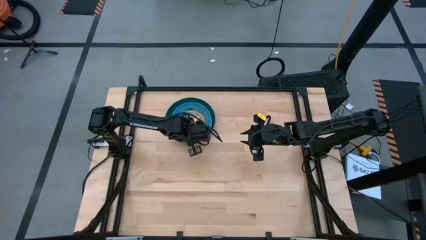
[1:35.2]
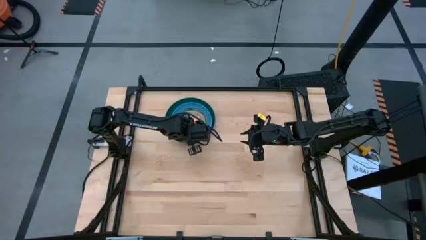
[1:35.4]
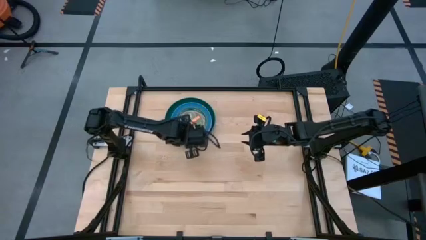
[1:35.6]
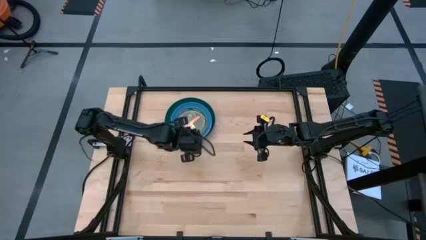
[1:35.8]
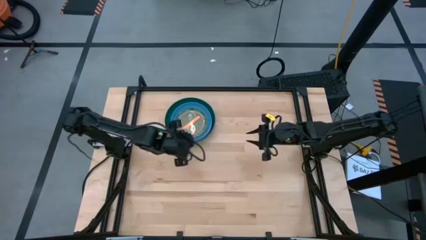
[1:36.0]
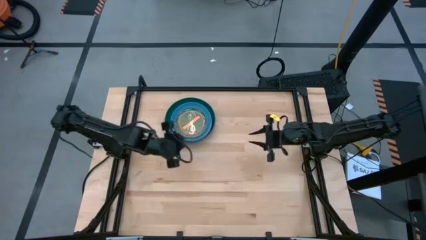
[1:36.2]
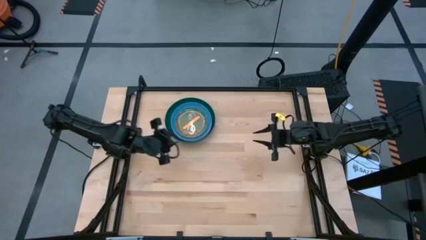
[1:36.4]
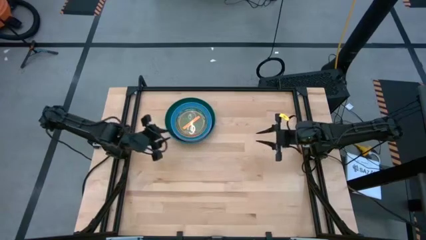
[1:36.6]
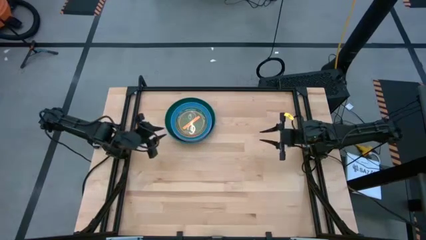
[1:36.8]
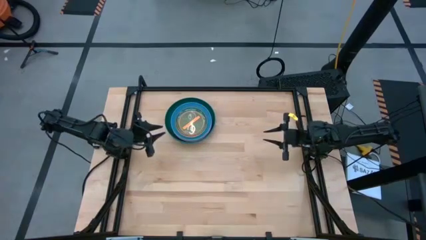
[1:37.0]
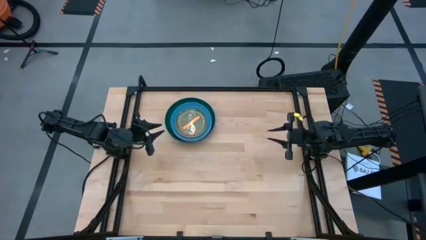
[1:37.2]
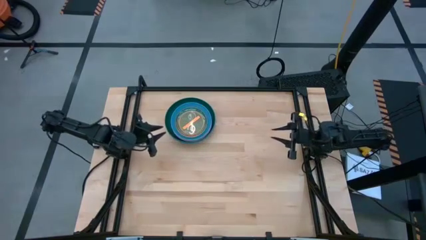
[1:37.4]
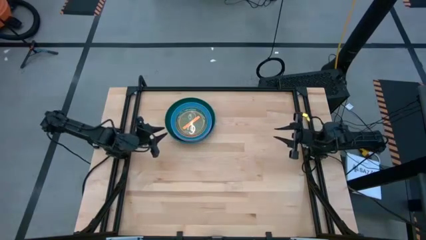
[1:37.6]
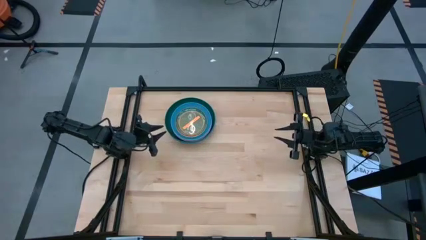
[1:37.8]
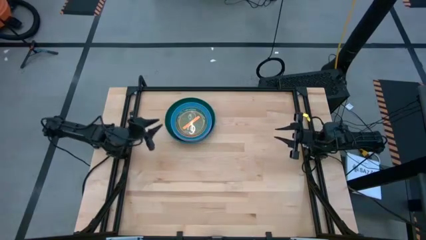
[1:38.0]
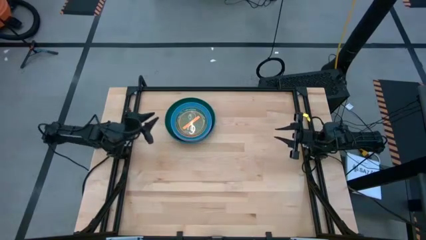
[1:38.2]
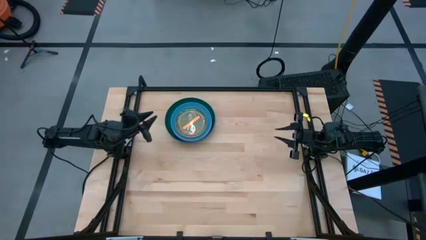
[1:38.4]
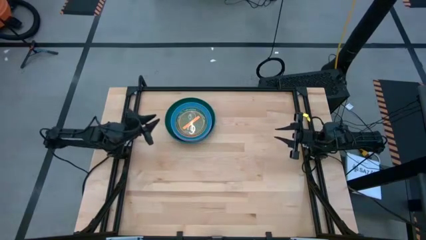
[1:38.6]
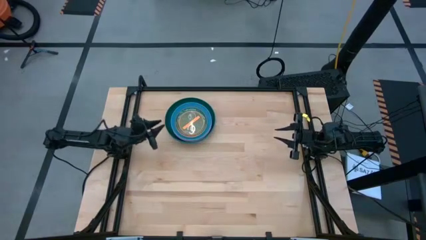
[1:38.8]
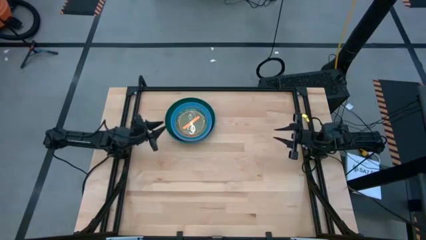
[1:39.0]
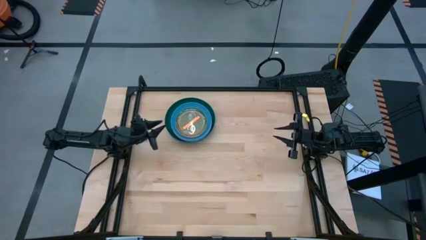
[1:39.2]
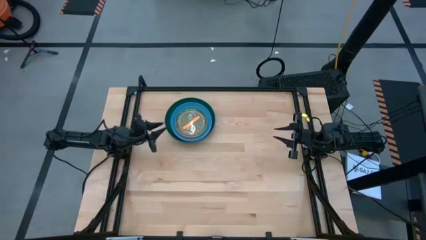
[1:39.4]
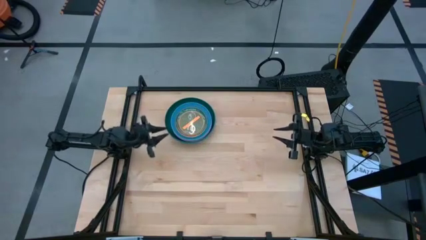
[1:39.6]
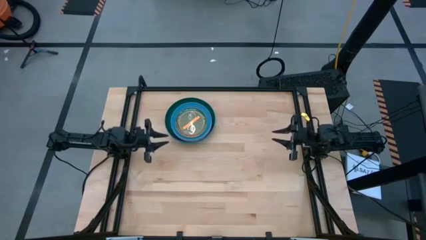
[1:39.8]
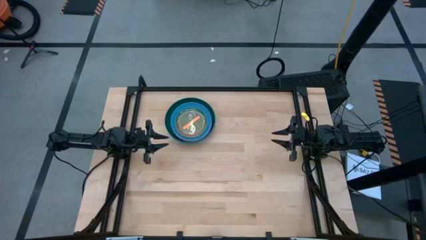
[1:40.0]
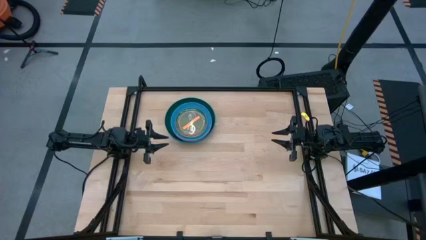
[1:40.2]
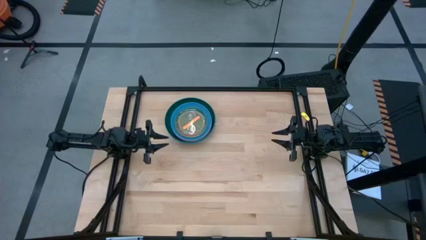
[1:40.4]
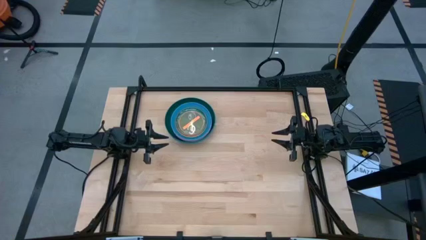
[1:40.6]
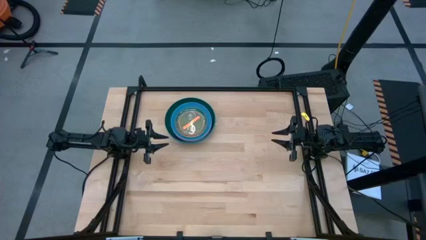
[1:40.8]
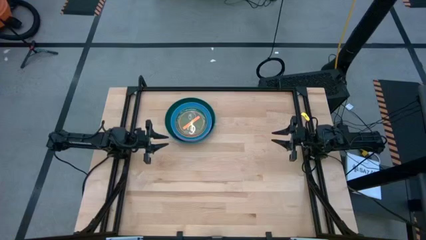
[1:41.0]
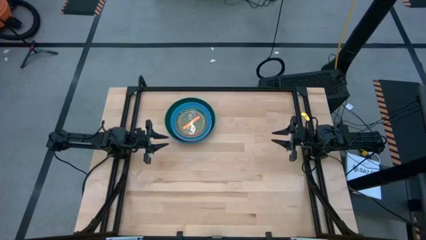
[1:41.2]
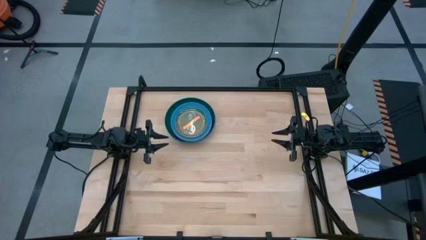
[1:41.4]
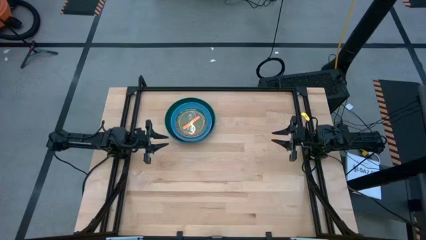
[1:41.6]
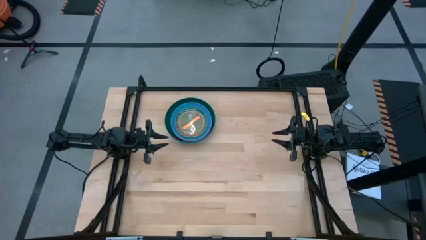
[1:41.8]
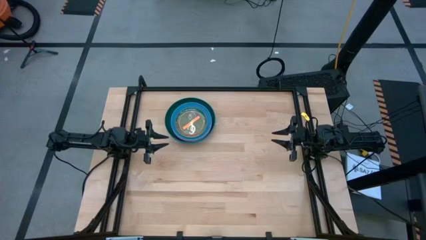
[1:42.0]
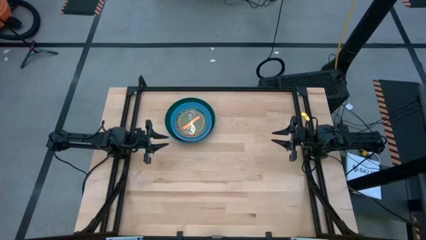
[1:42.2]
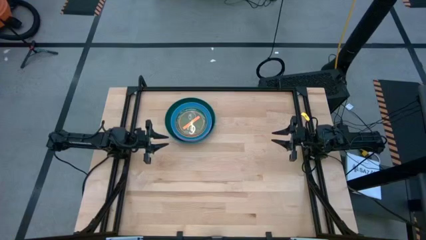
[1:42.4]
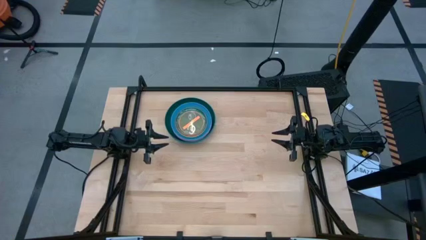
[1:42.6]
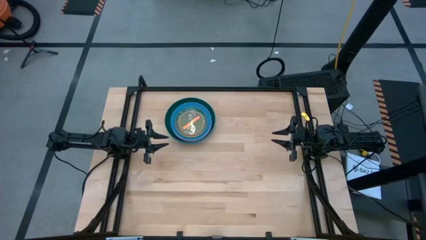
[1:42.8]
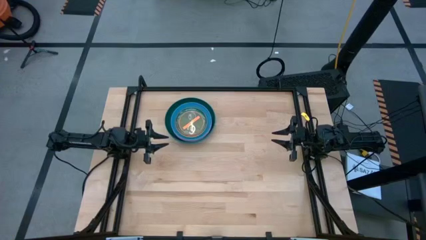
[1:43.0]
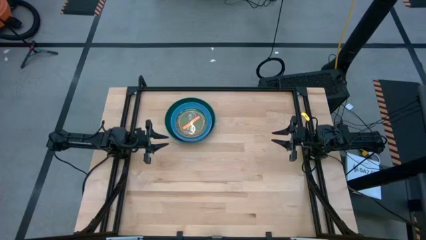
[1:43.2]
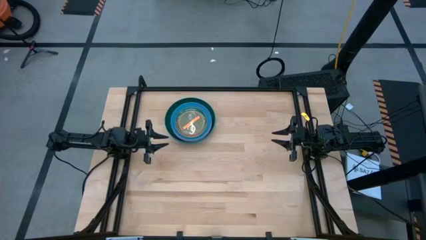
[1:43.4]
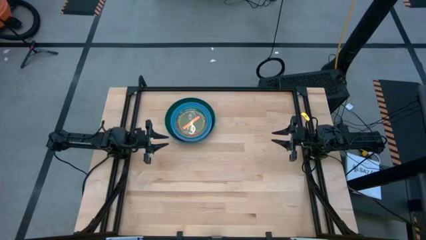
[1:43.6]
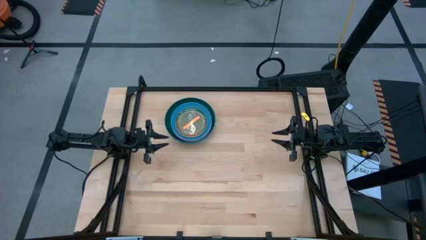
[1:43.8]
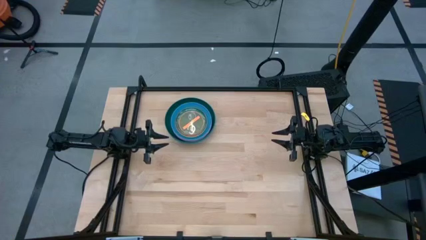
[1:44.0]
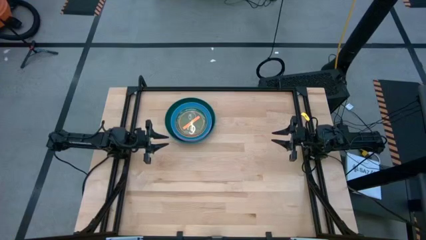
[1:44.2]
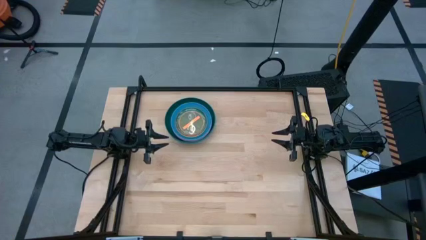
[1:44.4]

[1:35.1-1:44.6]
Task: Stack plastic plates
Return to Home Position

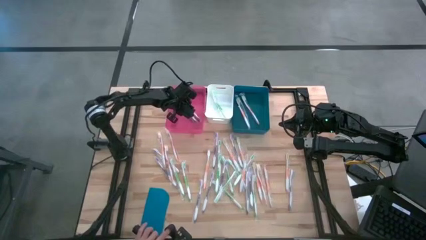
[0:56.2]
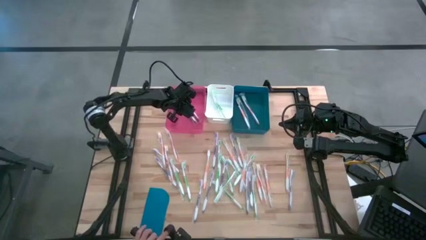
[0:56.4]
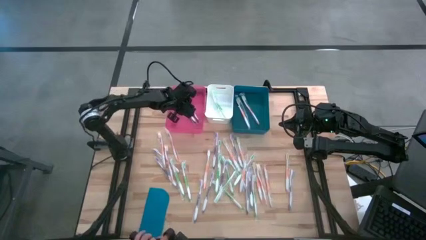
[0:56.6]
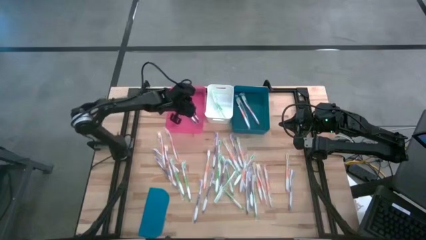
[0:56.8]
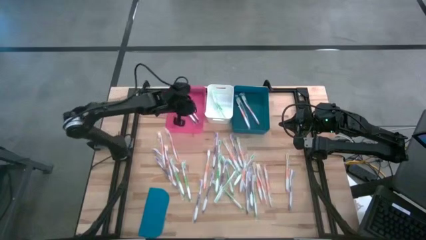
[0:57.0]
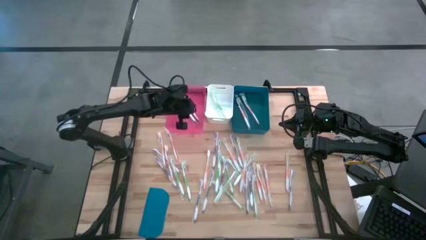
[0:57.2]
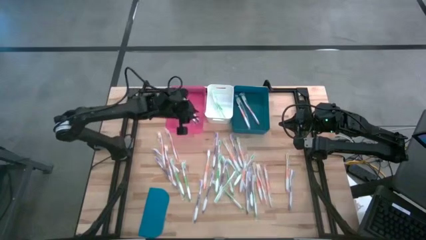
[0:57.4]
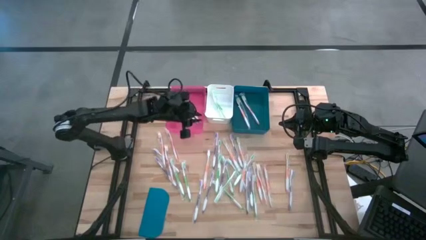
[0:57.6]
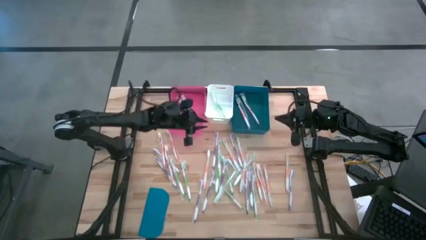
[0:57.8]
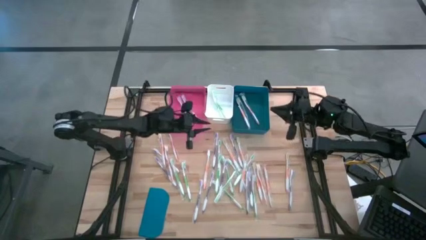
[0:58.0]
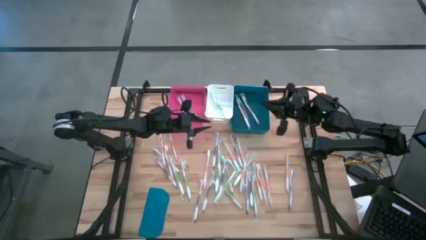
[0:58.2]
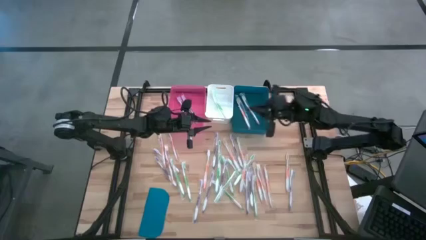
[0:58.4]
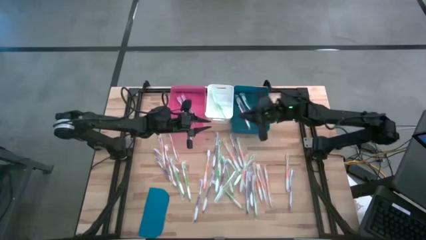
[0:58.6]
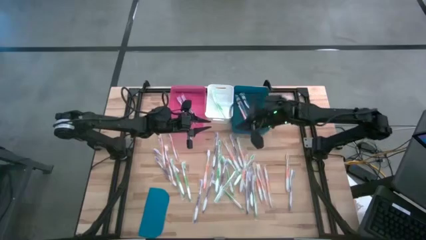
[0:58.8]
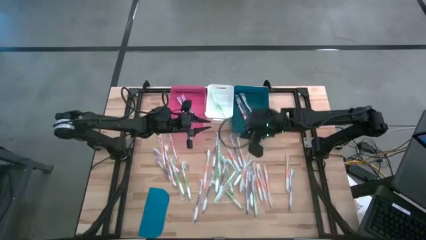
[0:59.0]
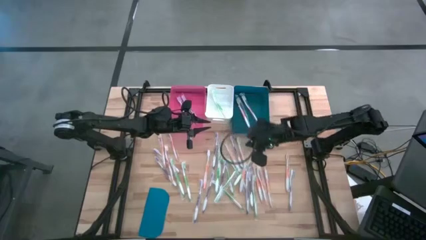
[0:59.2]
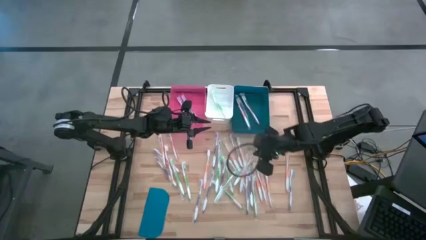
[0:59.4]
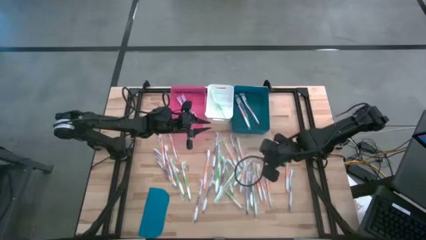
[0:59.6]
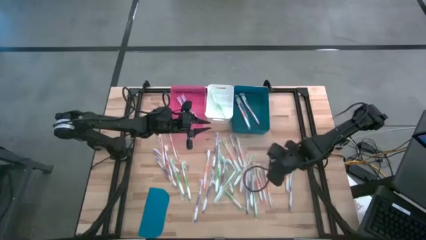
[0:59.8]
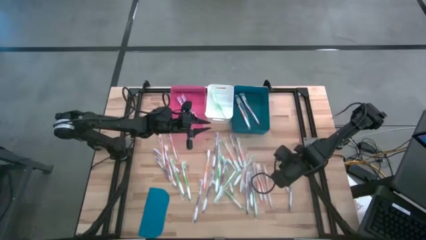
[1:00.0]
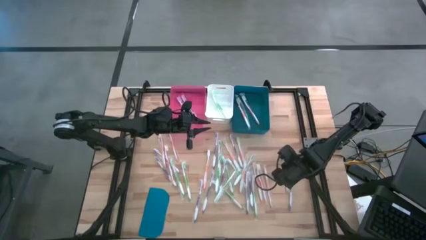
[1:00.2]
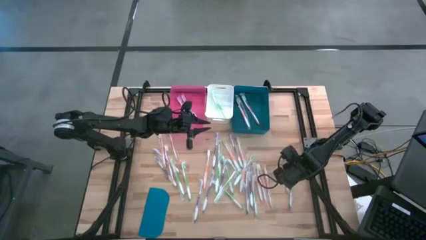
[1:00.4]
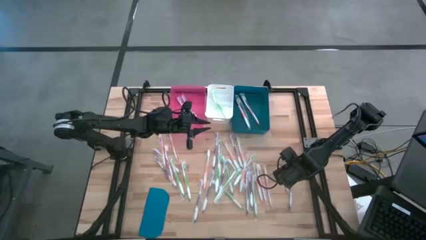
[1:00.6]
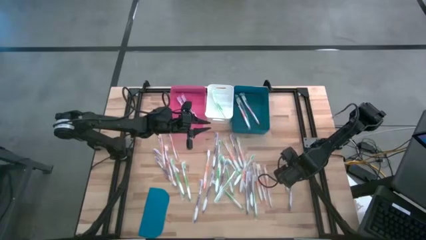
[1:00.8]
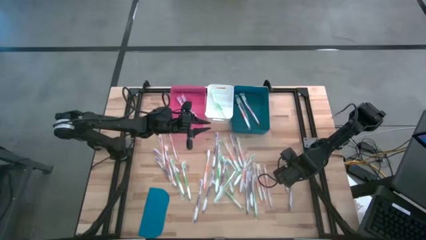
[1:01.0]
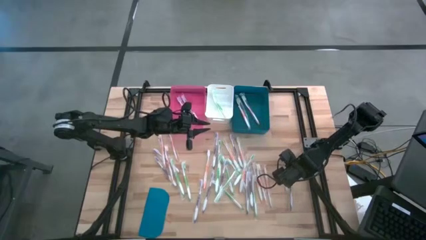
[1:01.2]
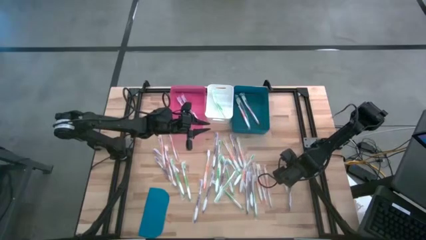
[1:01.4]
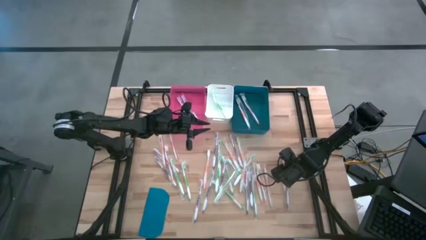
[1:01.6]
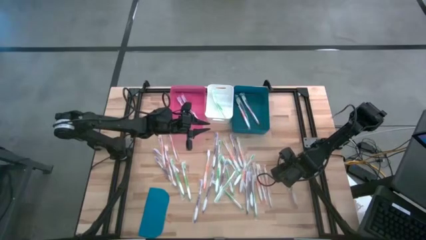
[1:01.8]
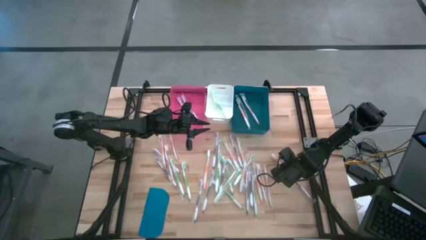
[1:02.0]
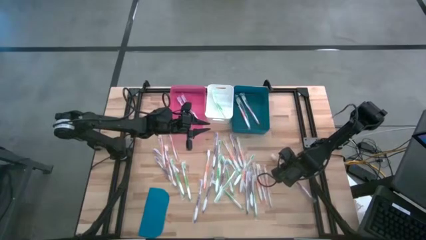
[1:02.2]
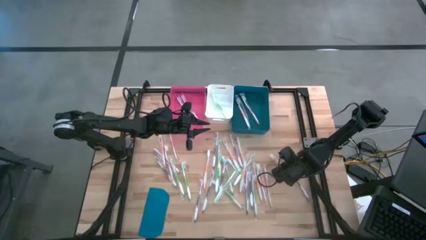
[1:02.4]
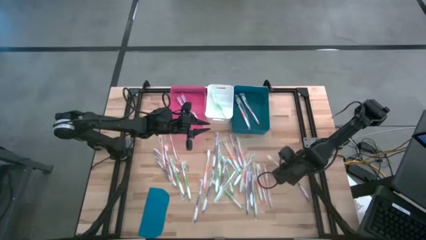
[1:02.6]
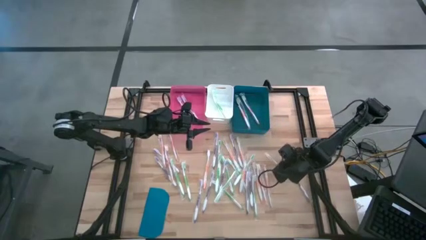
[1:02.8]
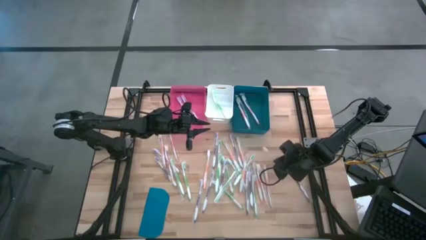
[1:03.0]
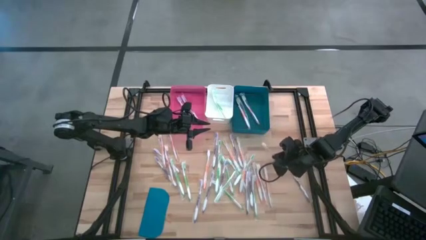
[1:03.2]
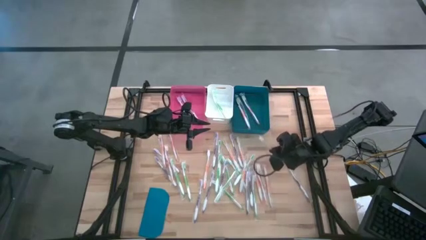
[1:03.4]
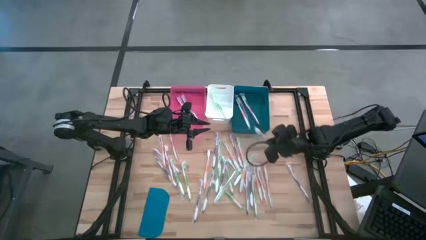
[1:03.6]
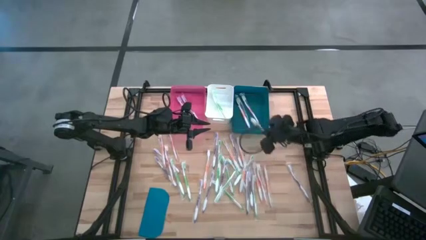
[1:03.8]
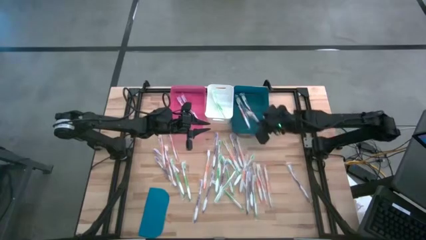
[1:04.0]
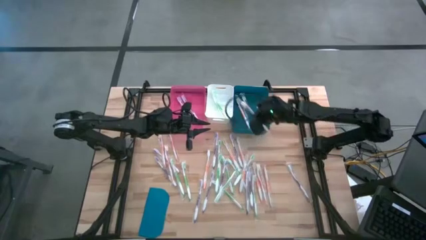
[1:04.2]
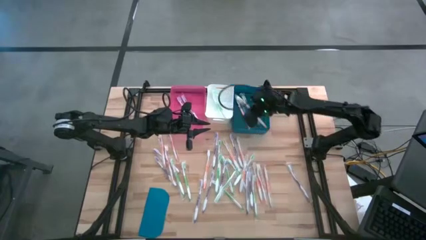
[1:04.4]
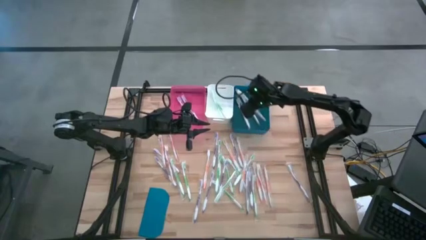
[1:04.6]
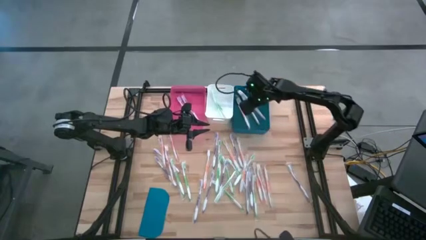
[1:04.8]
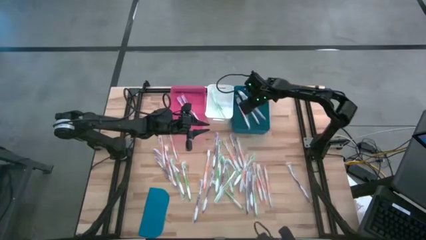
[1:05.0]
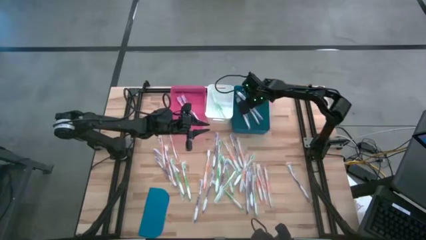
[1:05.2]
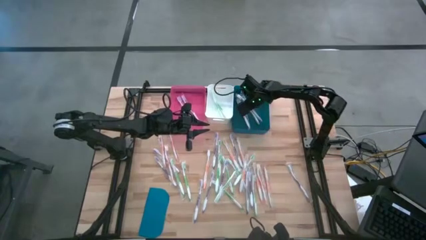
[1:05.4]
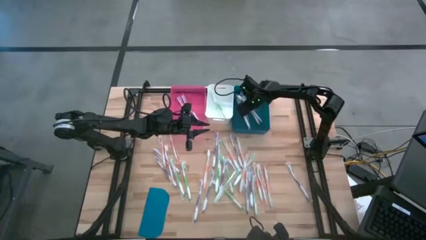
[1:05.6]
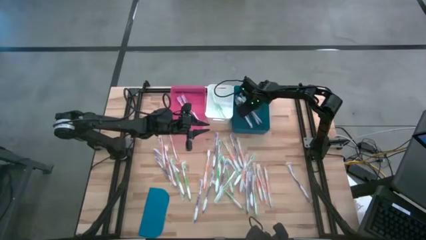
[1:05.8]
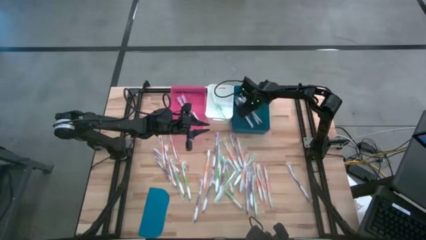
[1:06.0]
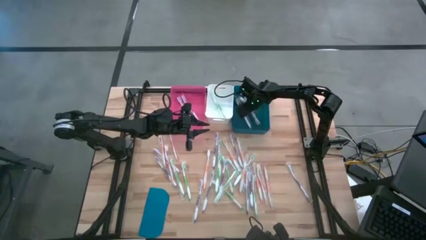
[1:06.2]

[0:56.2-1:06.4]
Task: Pick & Place Toothbrushes
Put the orange toothbrush into the blue bin
